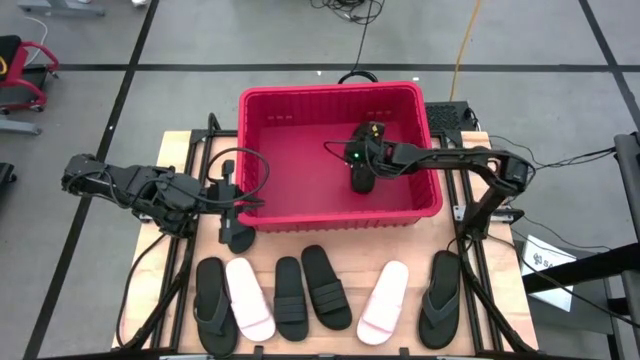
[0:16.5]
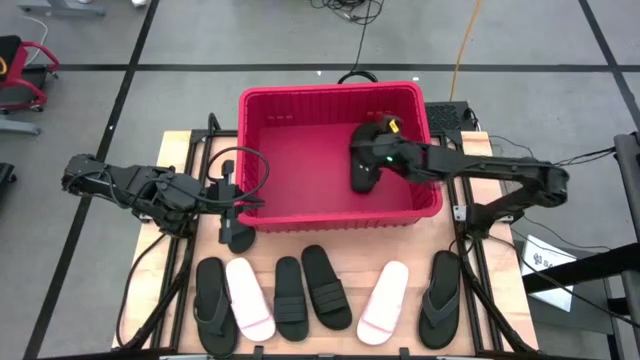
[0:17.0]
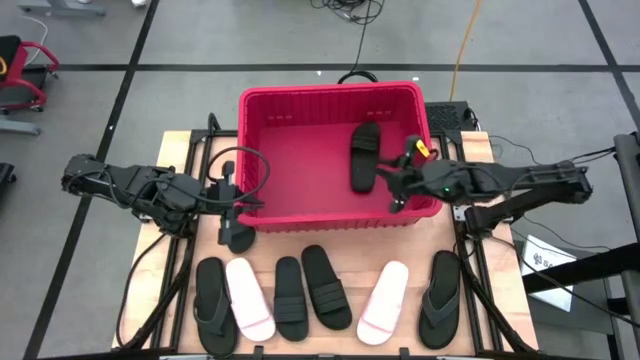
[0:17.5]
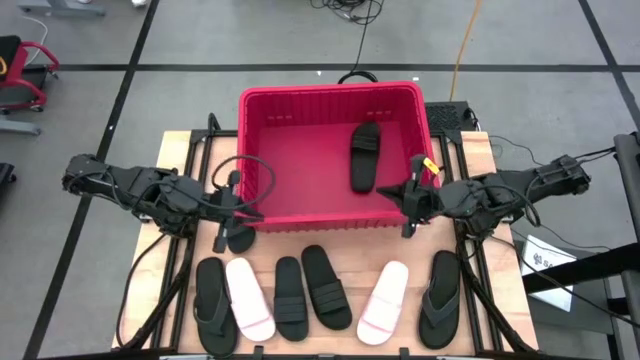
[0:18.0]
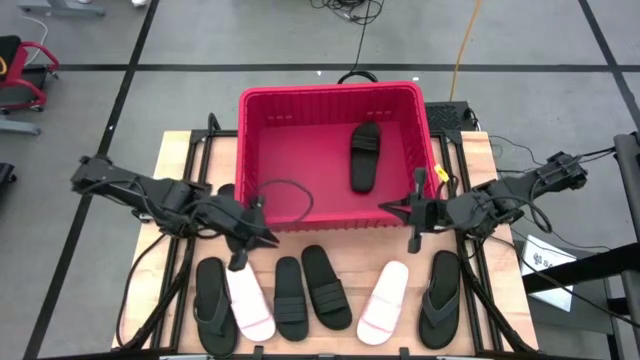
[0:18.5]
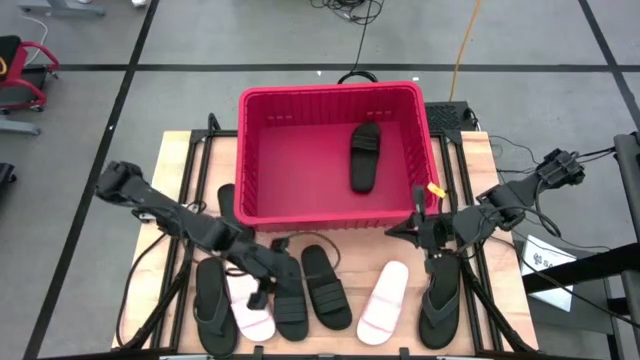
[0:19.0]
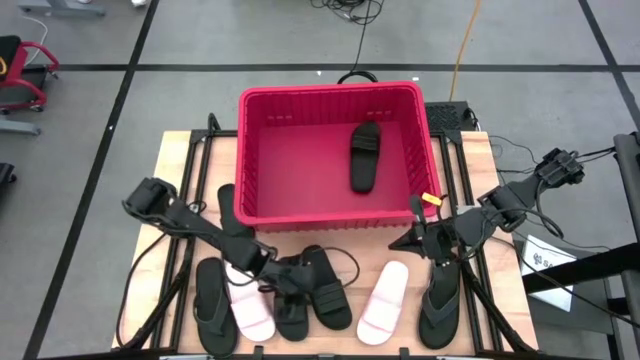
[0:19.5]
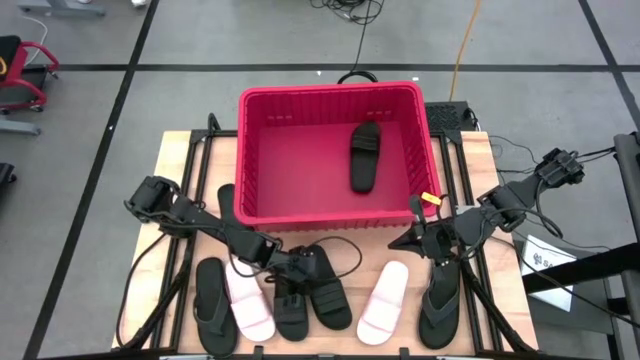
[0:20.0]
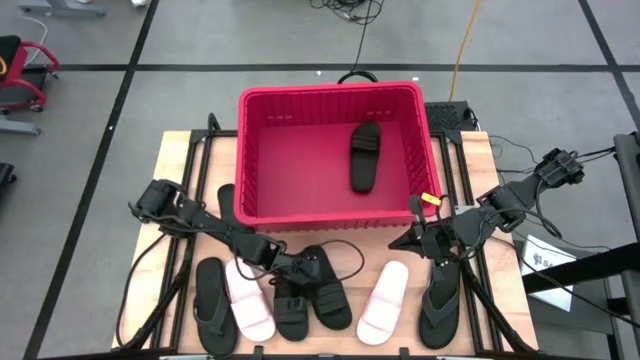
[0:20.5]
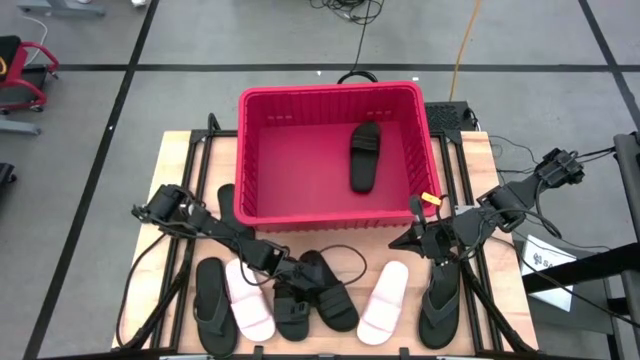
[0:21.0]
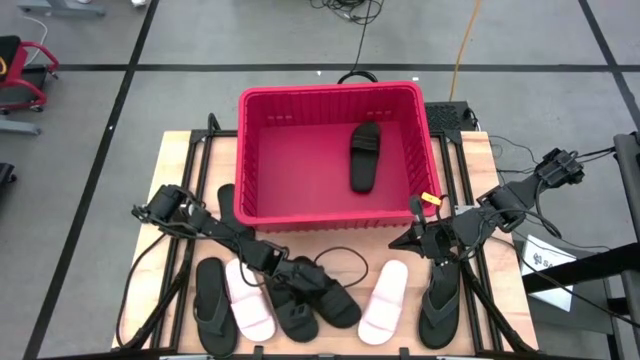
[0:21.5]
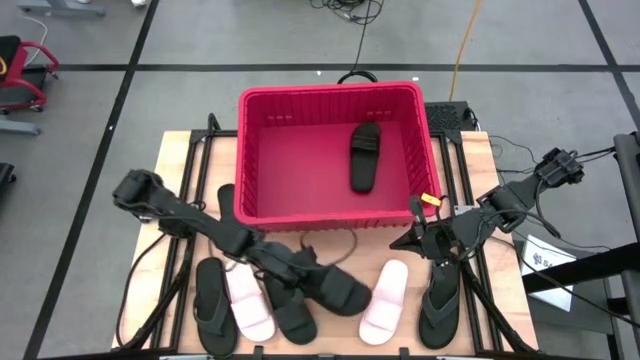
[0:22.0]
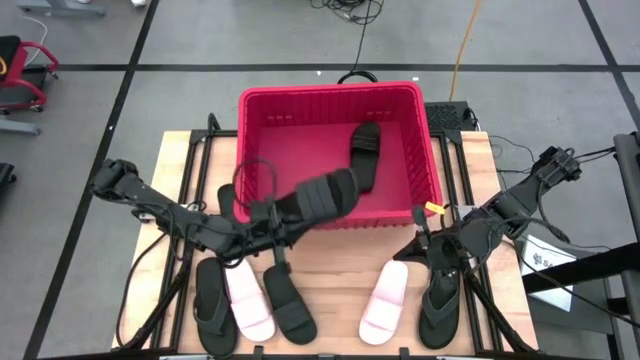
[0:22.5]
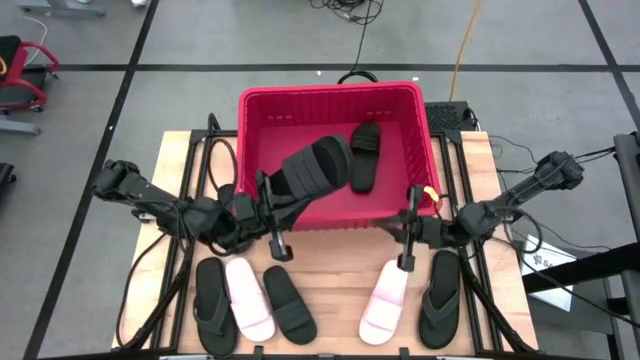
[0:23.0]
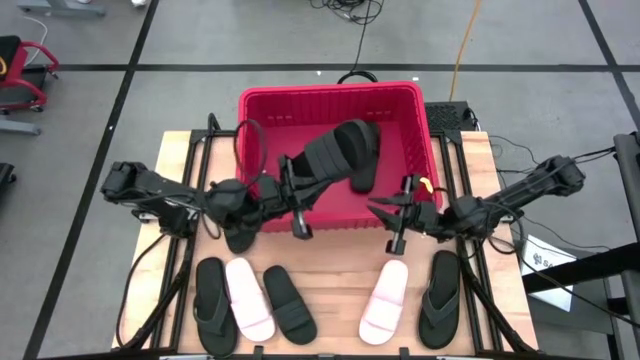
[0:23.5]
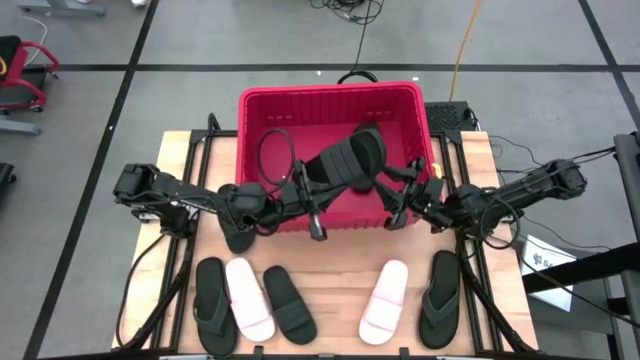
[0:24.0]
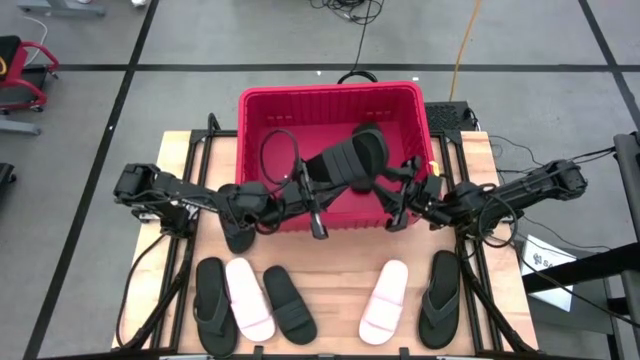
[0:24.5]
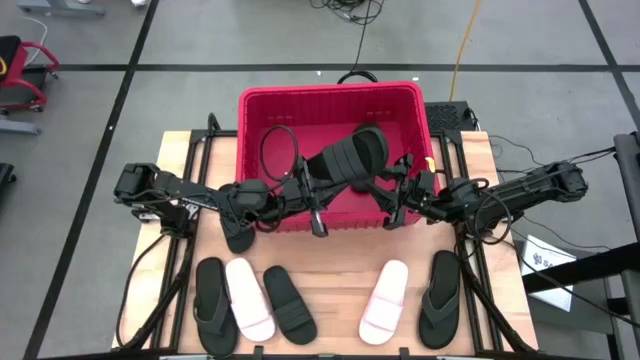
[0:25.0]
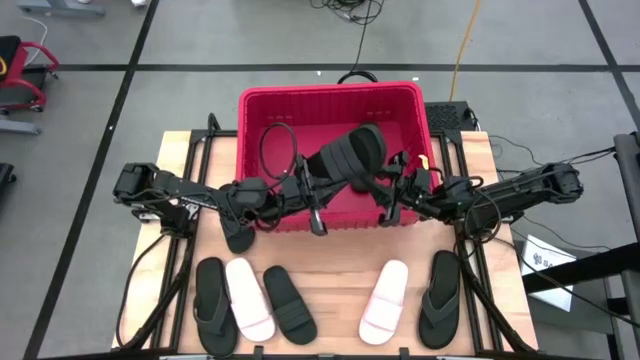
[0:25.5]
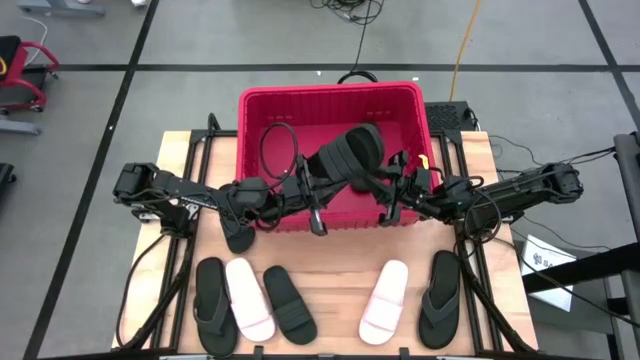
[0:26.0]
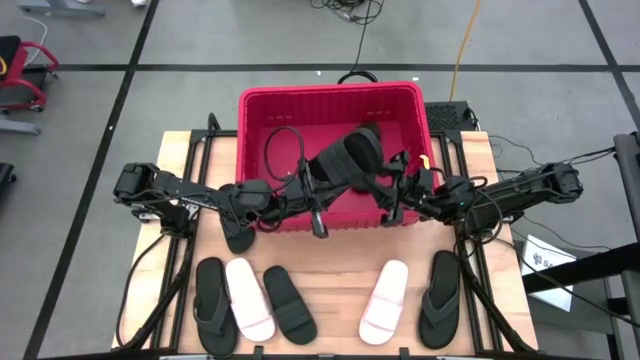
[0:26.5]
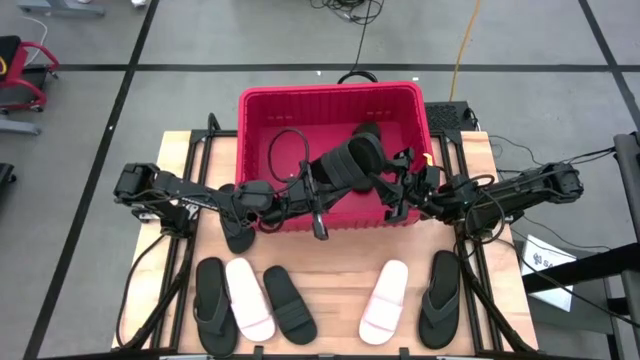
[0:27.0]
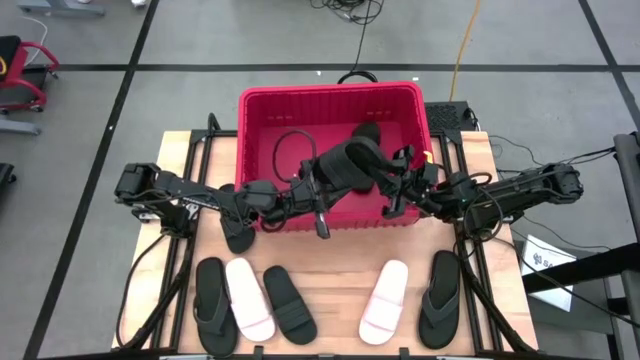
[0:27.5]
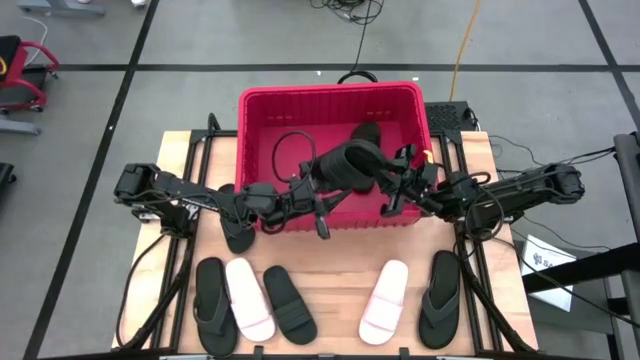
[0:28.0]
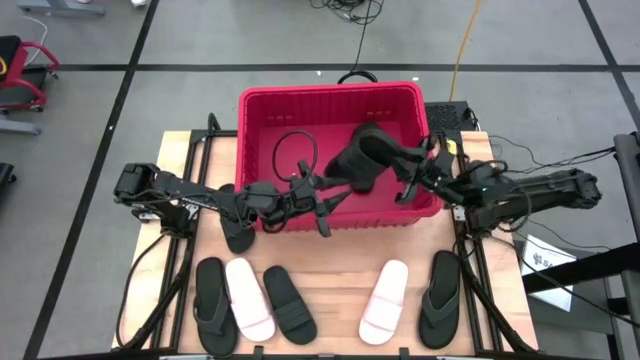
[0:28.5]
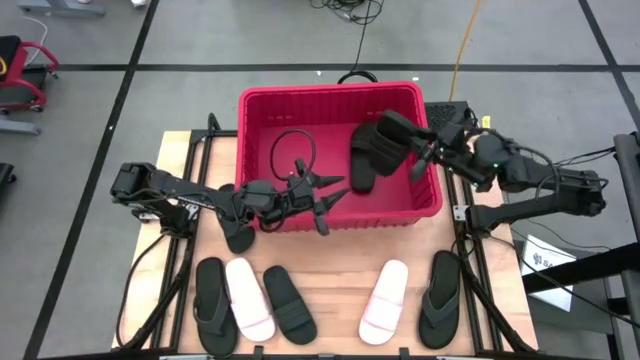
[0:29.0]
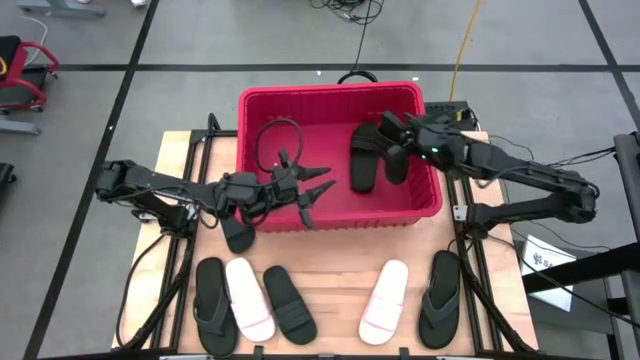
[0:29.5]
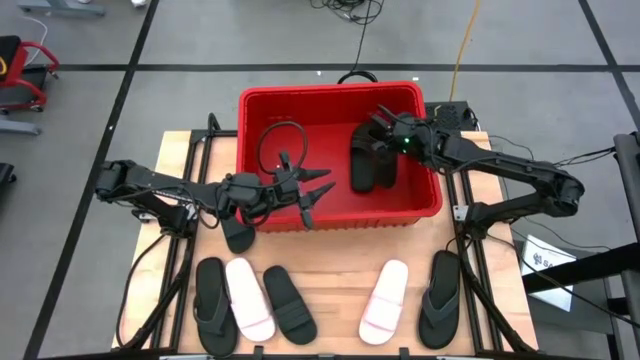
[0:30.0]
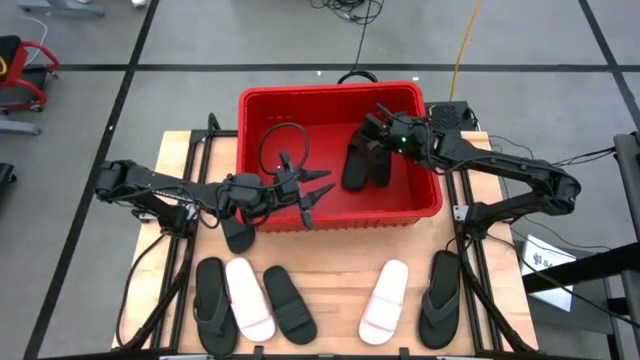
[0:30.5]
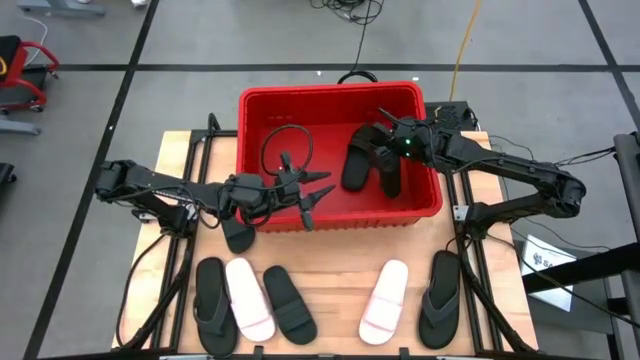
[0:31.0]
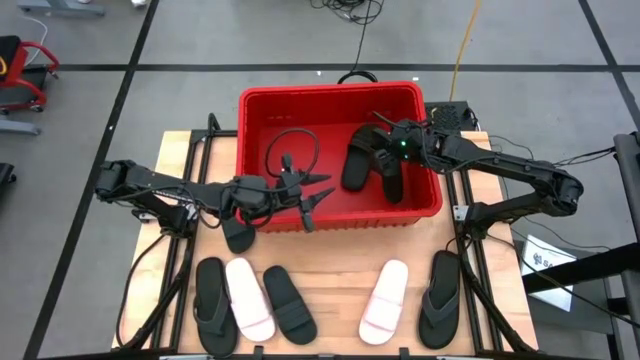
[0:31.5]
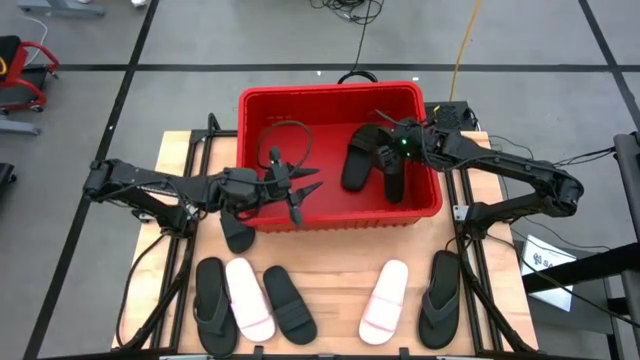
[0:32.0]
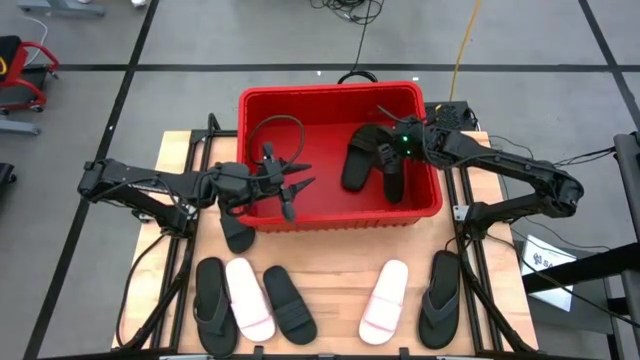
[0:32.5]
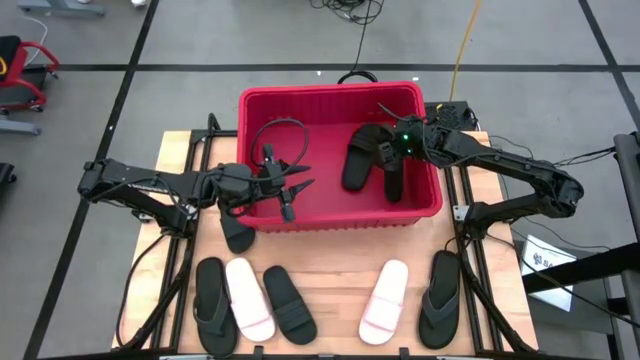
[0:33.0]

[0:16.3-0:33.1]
Task: Pick and place slides into bin
Put the black slide into the red bin

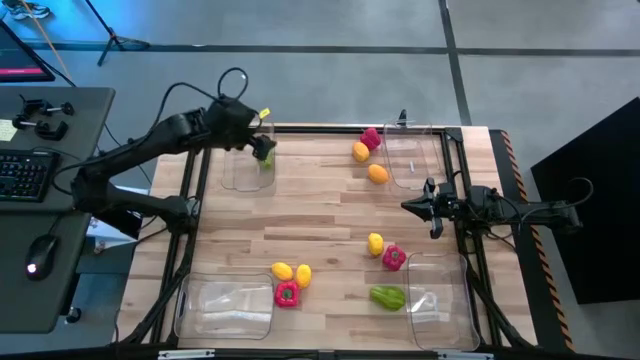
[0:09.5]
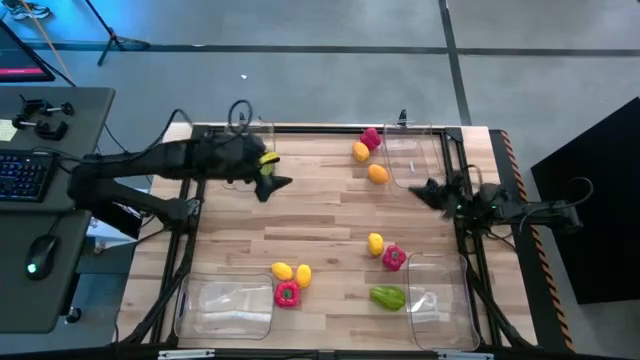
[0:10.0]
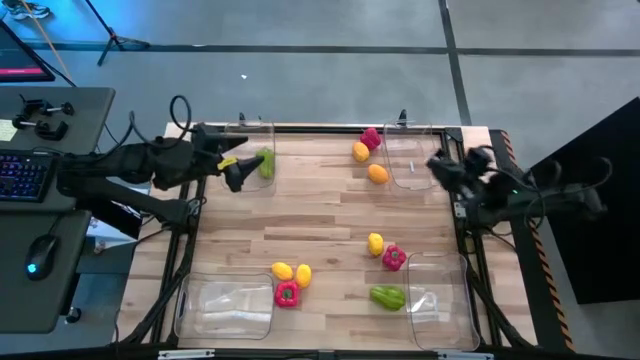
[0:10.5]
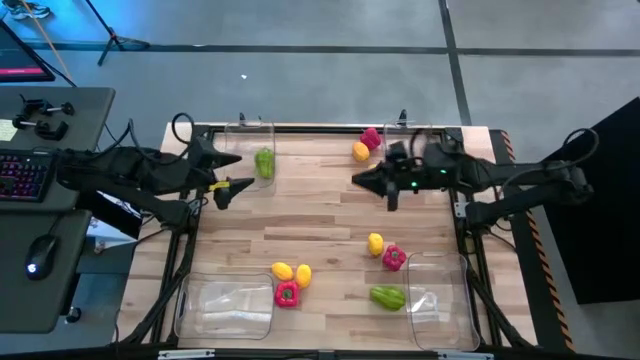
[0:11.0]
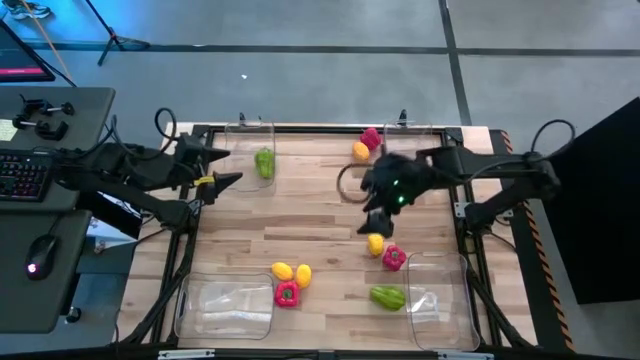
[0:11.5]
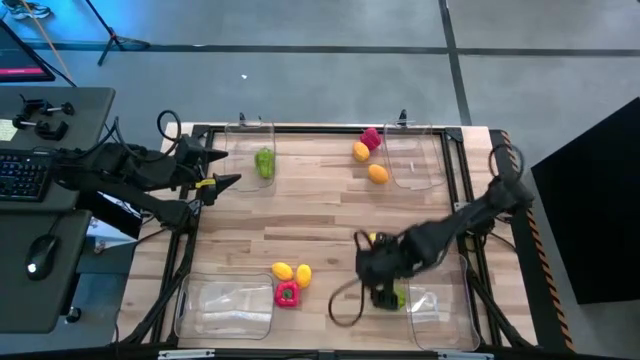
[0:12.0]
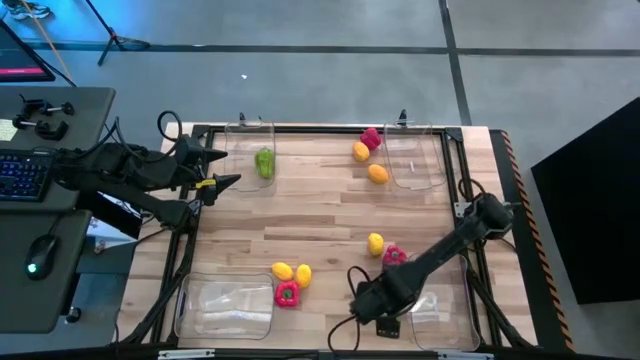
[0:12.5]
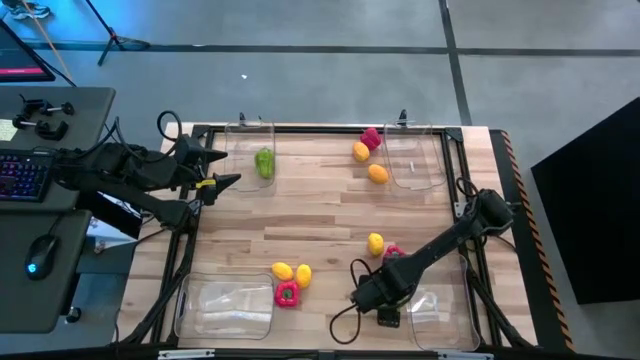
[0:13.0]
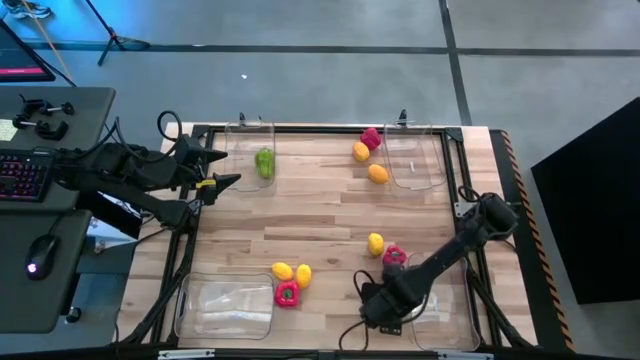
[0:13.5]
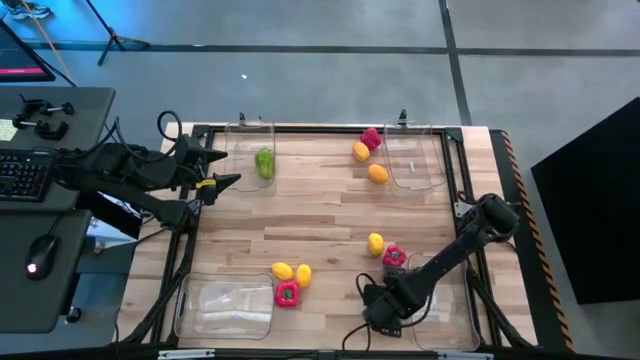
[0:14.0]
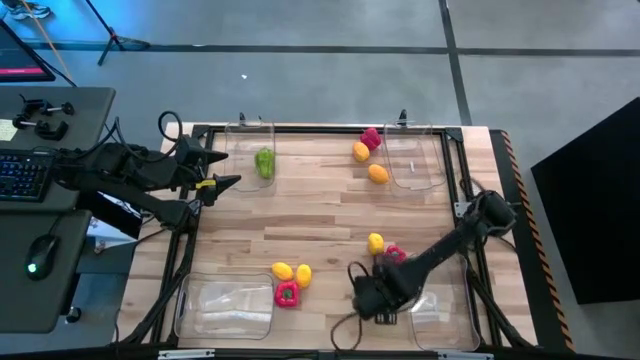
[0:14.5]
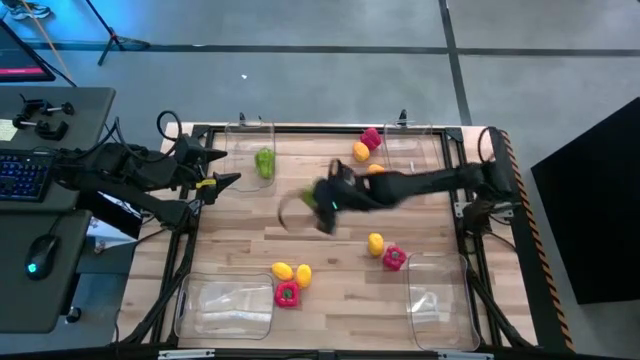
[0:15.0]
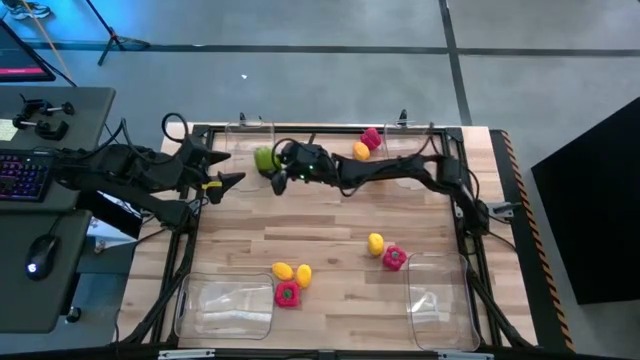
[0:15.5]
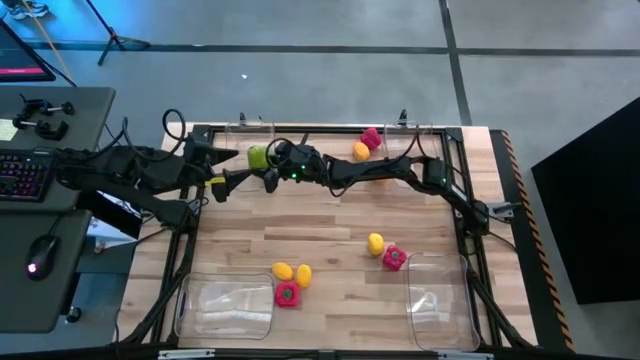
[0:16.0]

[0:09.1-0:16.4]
Task: Sort produce into baskets
Put the chayote into the top left transparent bin
